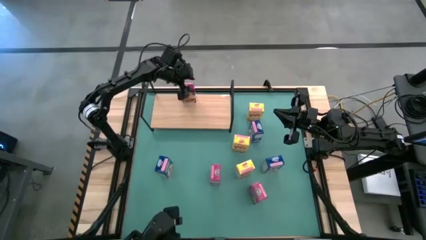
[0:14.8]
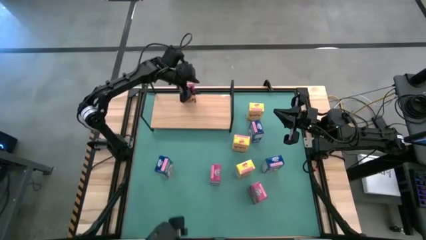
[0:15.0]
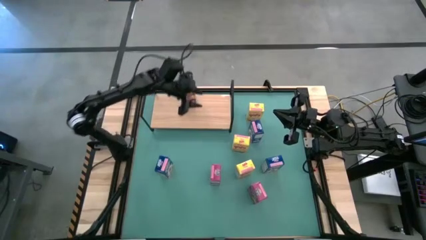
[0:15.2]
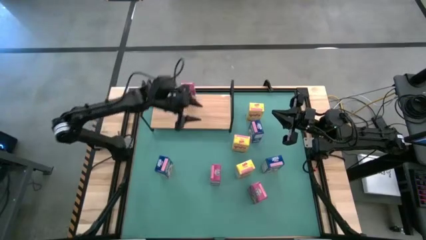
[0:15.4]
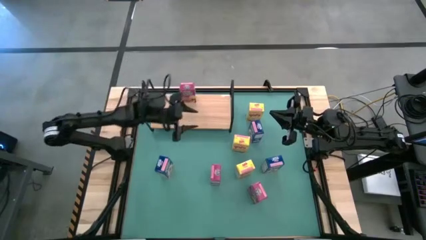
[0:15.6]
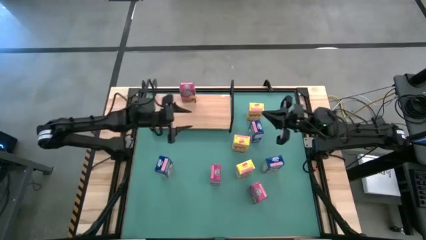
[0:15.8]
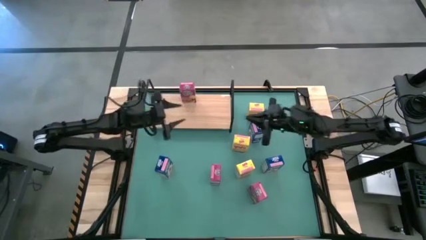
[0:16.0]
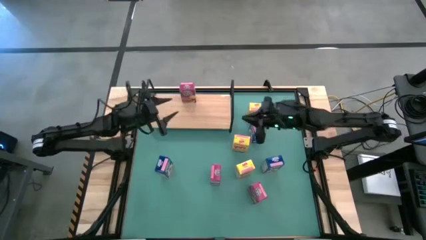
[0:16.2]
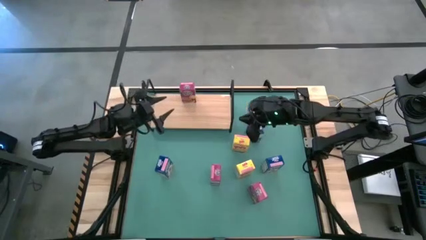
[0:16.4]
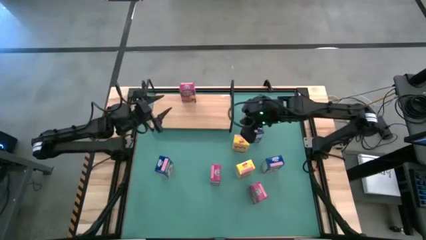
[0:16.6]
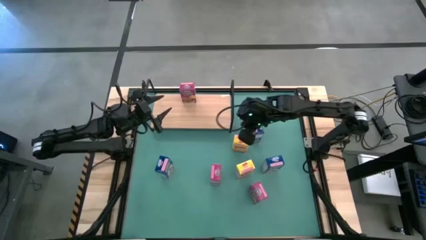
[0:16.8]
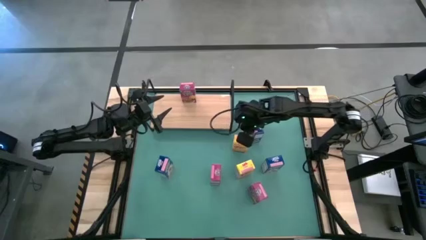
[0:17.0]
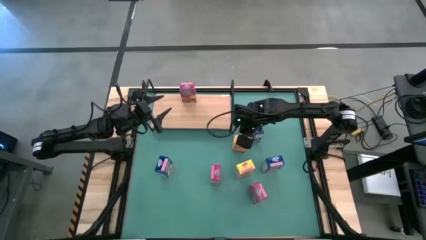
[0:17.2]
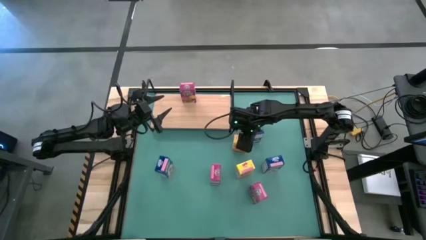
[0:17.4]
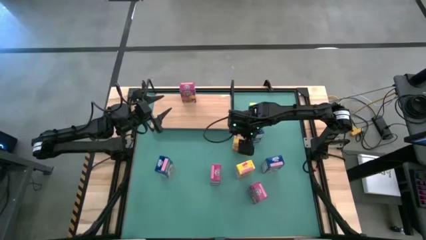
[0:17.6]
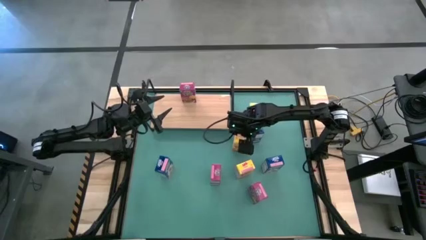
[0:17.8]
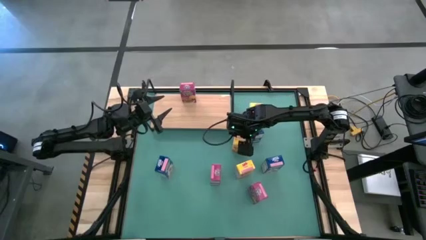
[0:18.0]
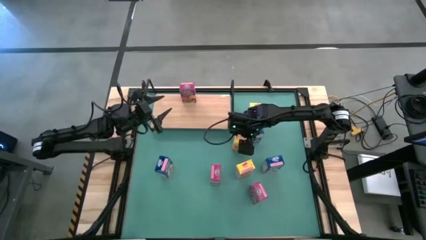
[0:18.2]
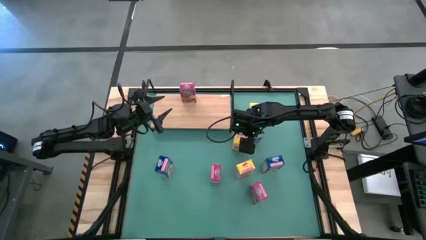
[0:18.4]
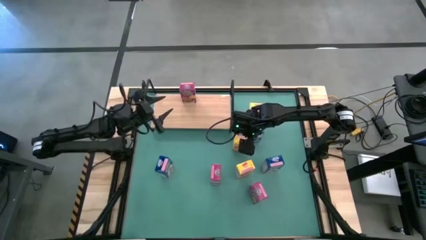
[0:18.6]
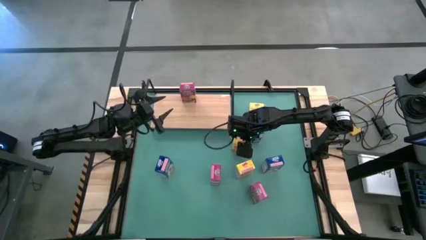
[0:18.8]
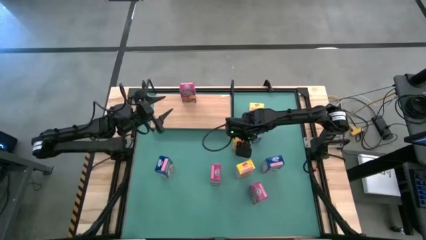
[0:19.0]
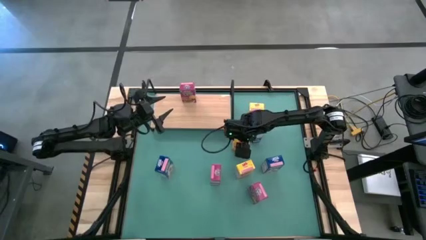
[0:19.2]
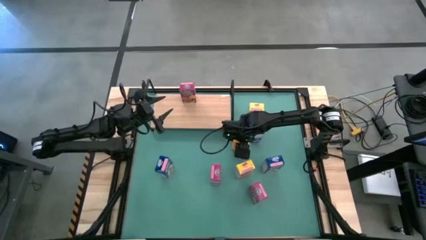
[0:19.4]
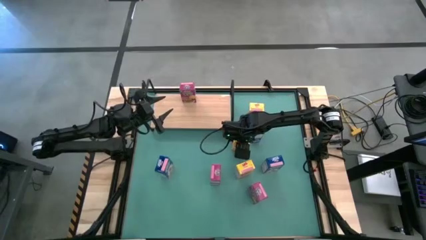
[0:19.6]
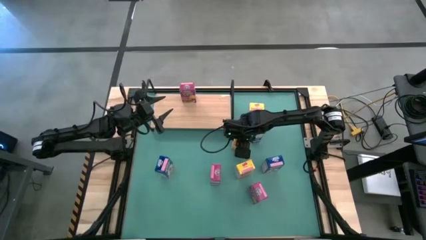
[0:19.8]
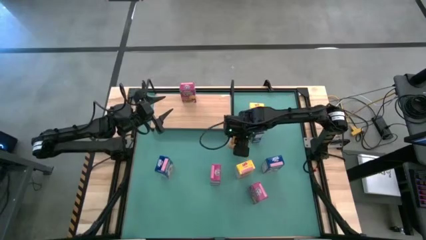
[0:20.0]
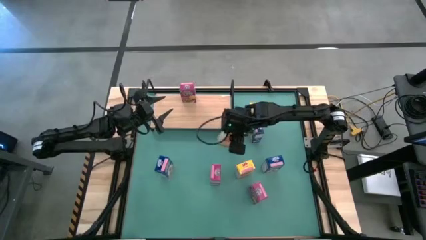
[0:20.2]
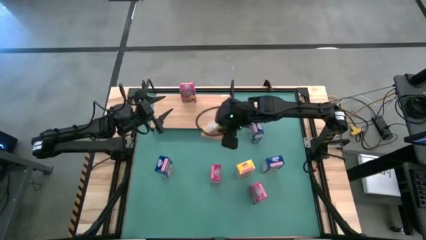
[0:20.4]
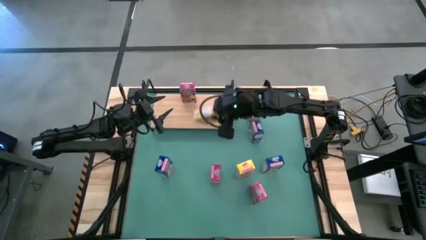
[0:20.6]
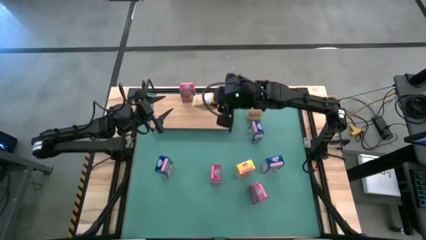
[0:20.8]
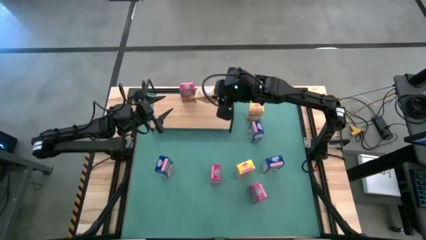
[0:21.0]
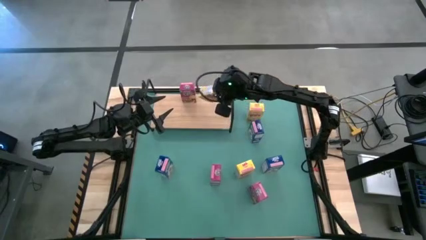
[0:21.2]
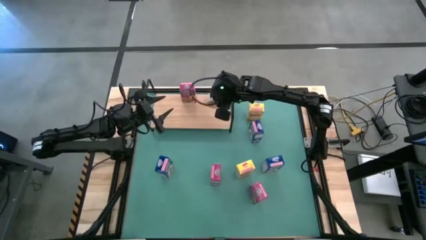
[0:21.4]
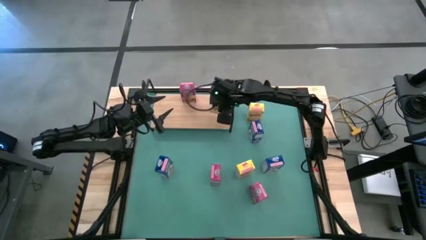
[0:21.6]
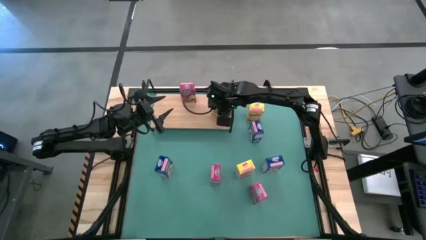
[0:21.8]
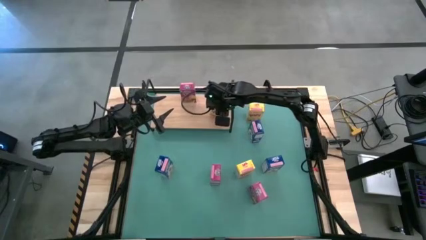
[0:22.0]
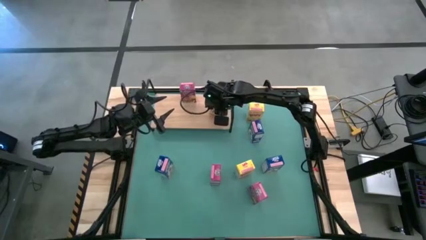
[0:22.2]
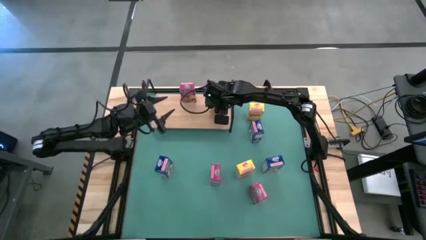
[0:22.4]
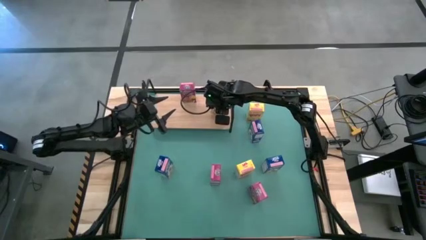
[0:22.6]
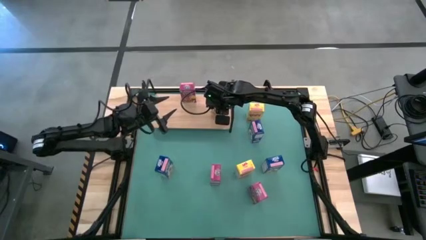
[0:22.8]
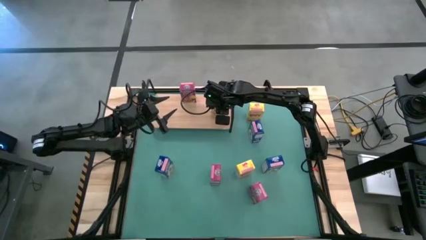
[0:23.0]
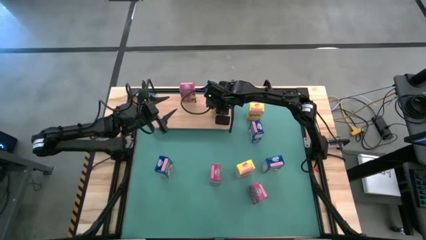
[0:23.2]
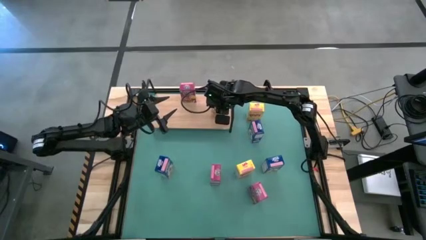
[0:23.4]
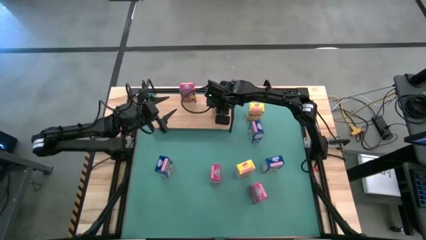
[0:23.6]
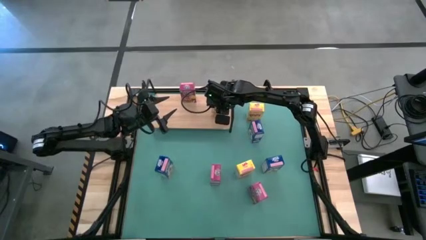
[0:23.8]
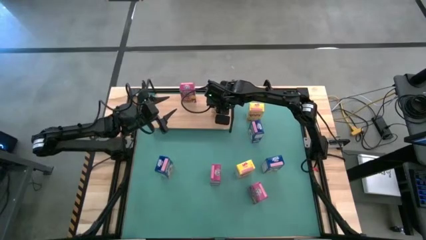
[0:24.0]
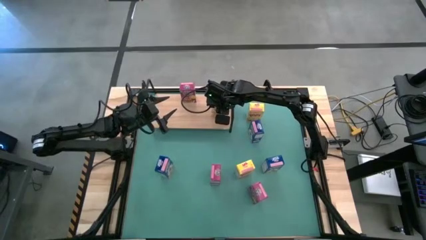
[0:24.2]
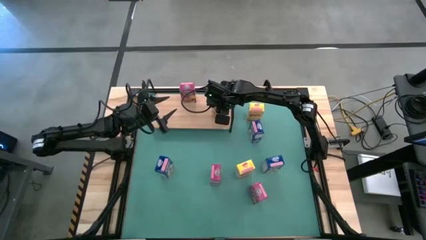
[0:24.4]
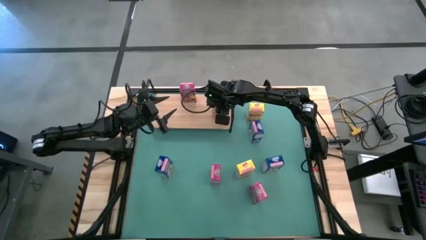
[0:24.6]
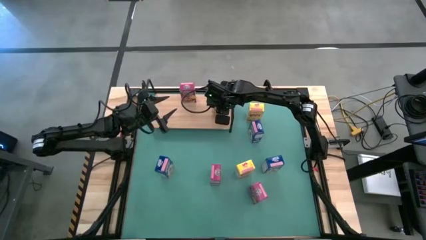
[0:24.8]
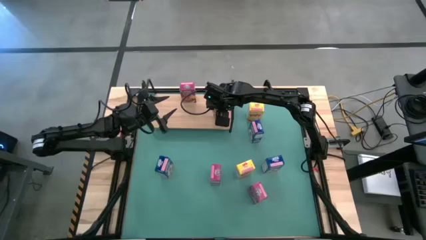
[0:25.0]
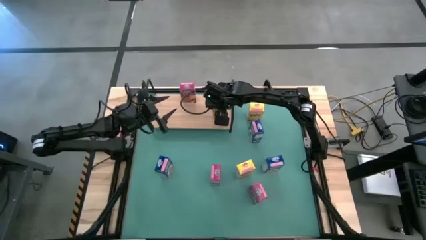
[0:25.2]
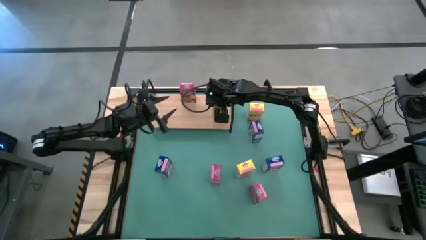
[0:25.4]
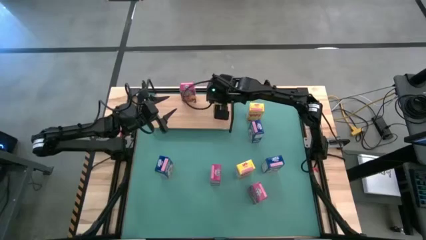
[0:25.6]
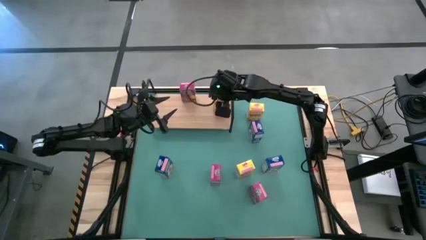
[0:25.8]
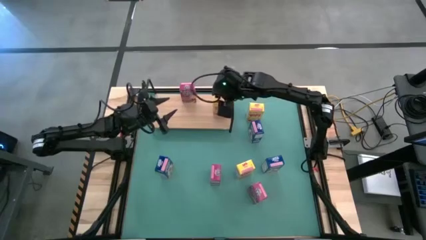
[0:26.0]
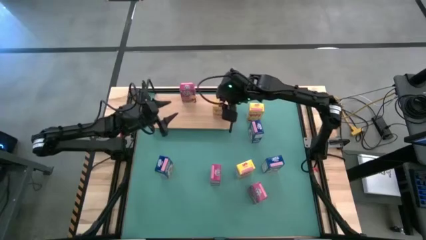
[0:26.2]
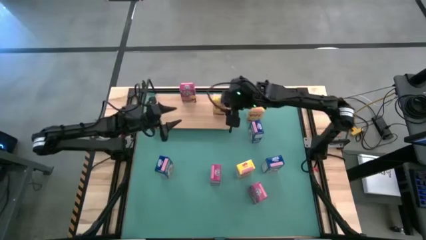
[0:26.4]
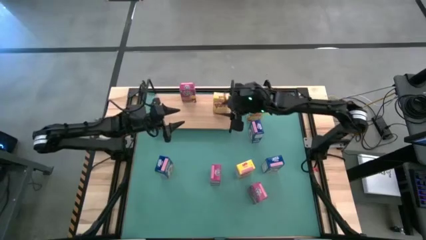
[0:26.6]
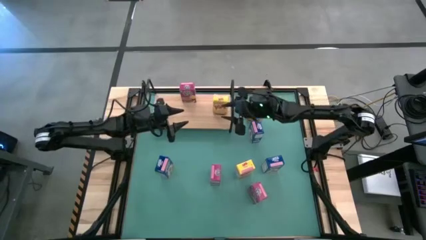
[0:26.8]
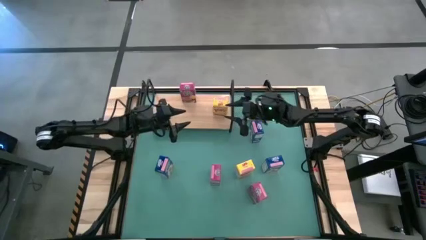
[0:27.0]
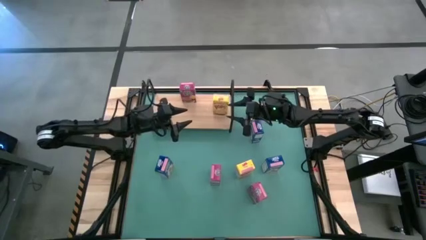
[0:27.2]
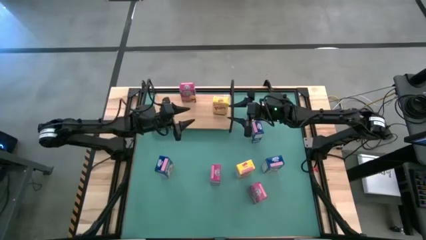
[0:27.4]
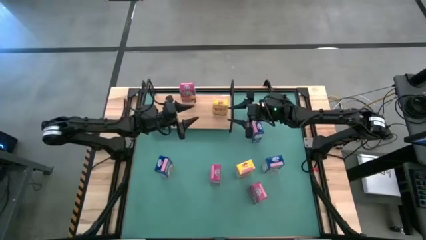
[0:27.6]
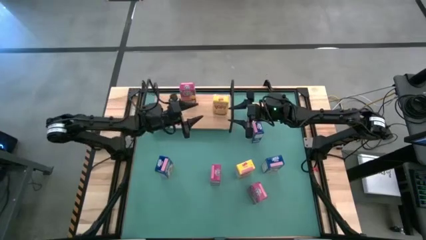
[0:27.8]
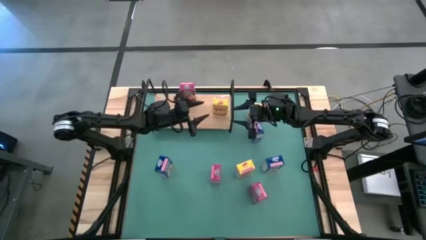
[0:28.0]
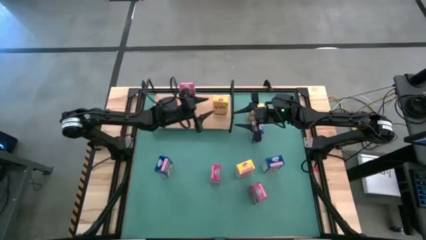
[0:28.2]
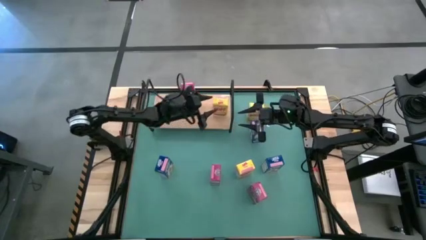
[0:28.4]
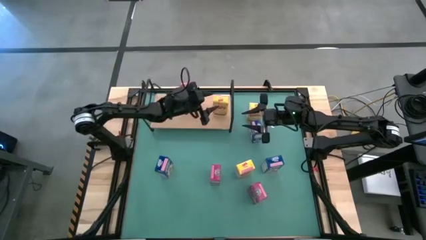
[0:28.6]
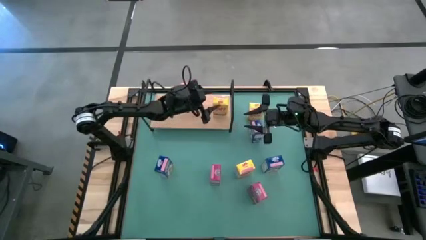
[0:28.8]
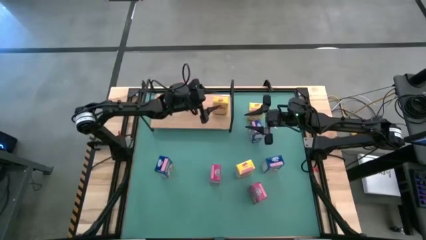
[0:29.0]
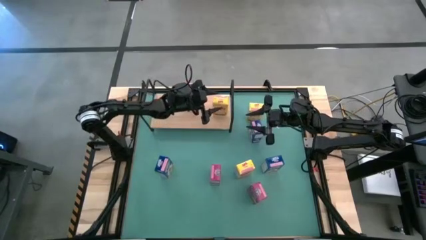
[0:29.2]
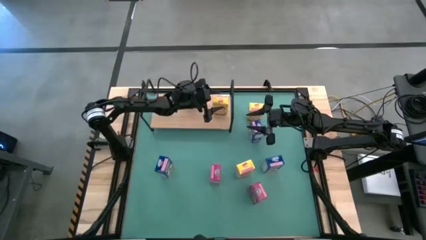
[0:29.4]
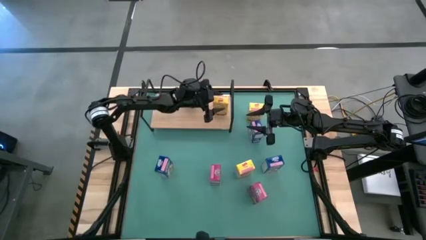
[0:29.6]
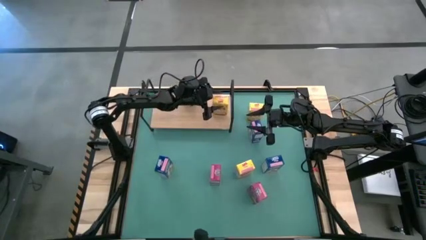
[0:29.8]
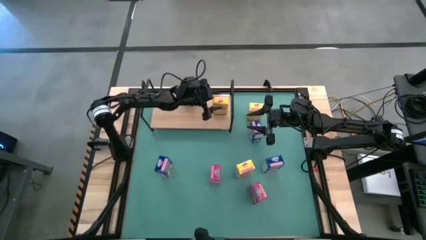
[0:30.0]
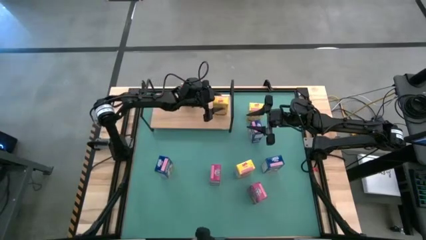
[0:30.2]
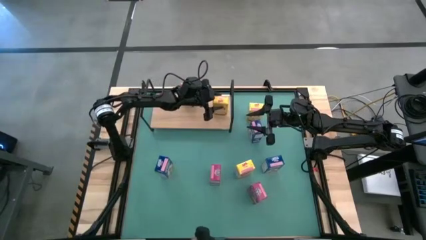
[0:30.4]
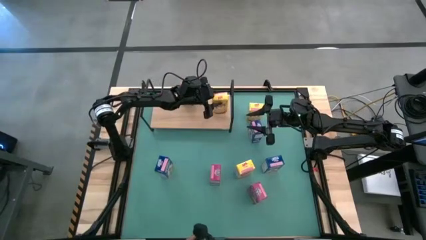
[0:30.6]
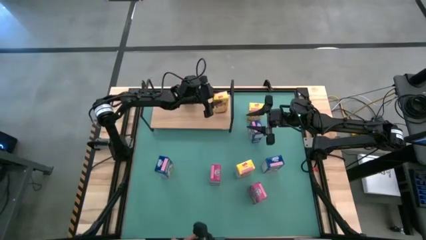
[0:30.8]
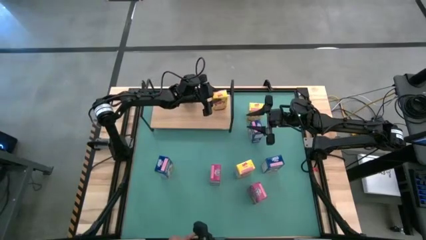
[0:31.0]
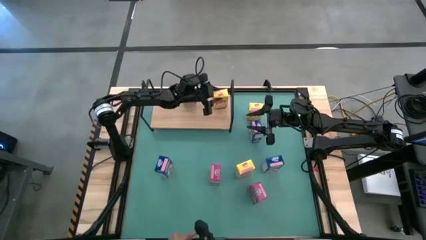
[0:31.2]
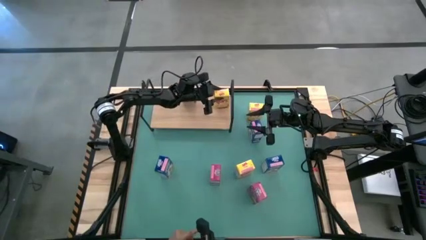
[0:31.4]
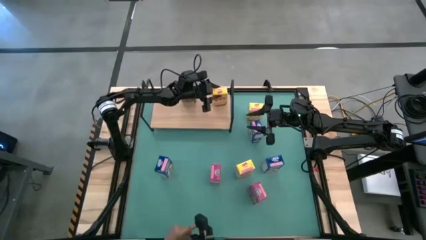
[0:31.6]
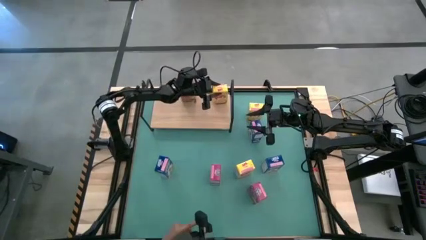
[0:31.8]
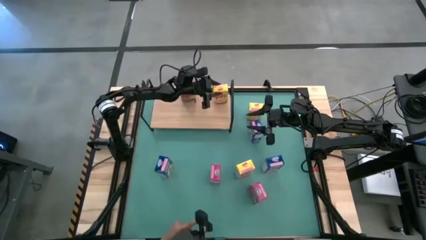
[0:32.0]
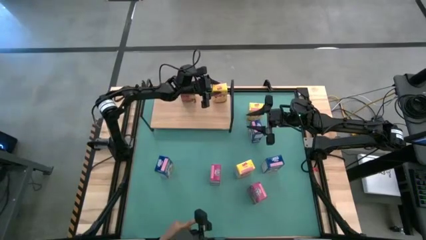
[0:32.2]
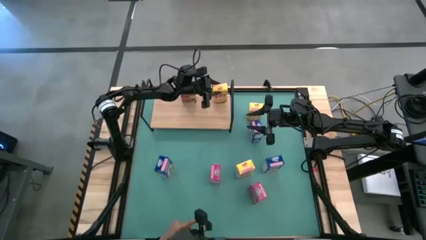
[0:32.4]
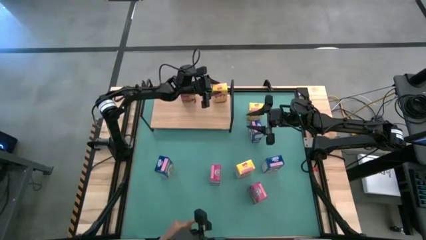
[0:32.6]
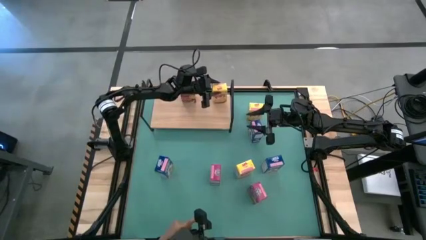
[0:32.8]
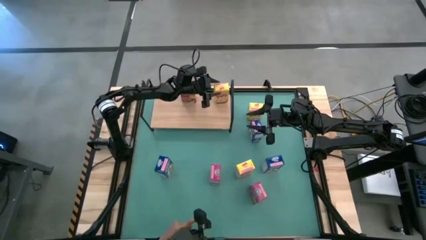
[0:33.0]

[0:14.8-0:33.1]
Task: Stack cereal on shelf
Put the middle yellow cereal box on the shelf
